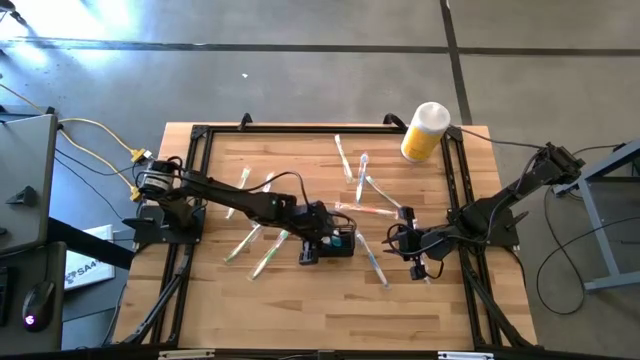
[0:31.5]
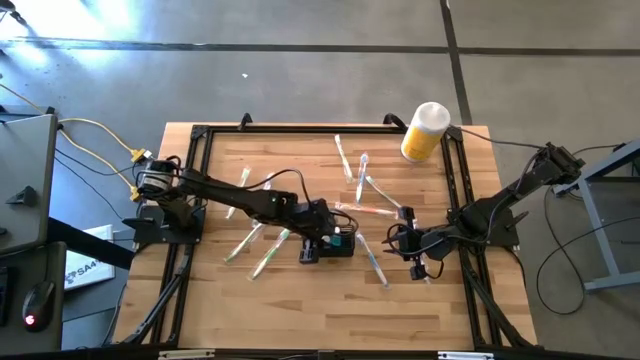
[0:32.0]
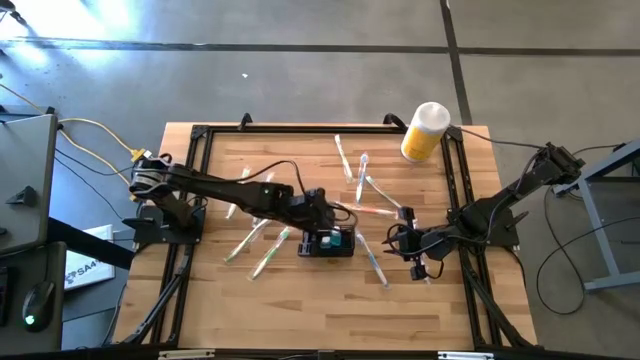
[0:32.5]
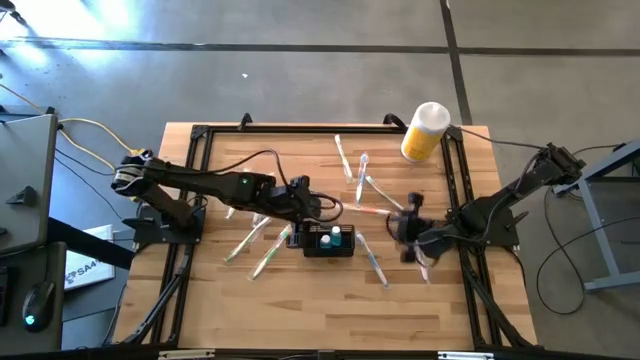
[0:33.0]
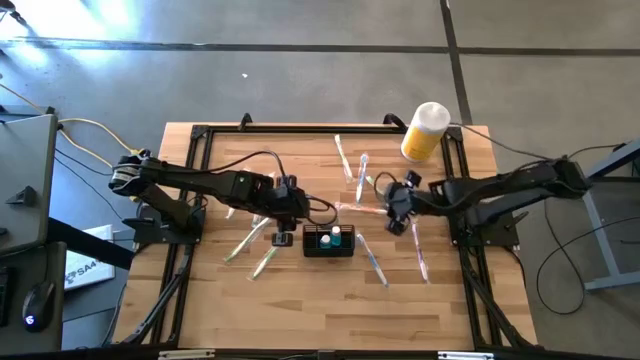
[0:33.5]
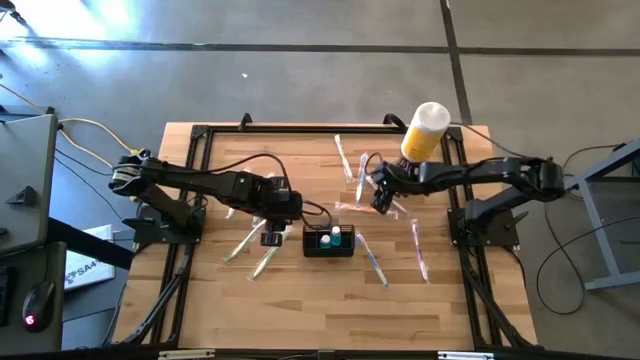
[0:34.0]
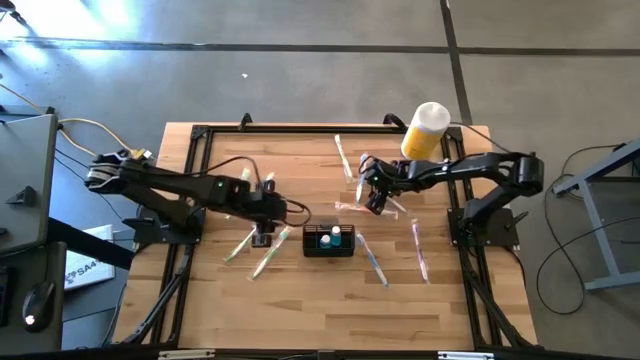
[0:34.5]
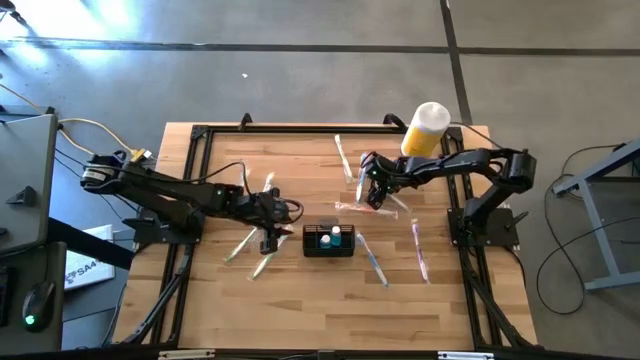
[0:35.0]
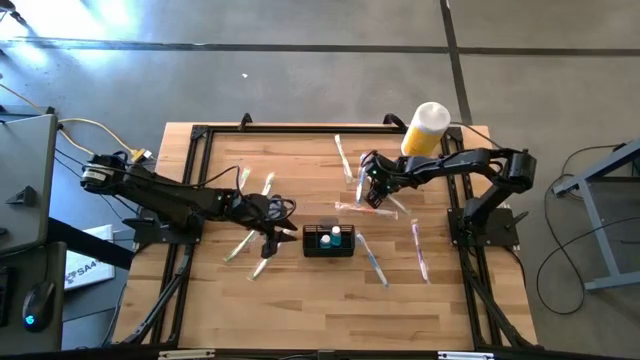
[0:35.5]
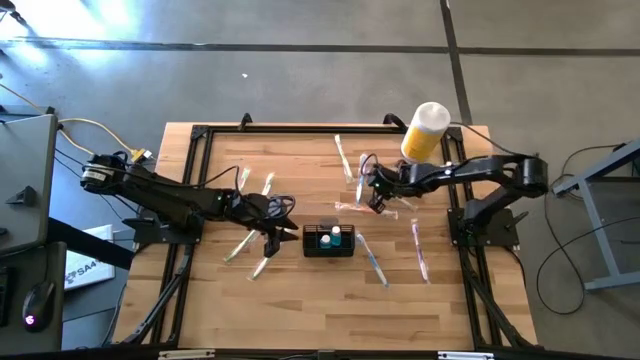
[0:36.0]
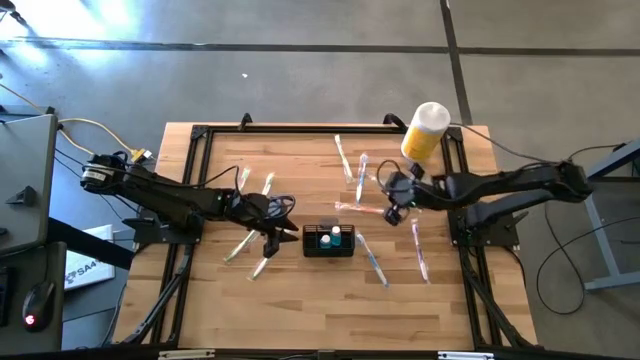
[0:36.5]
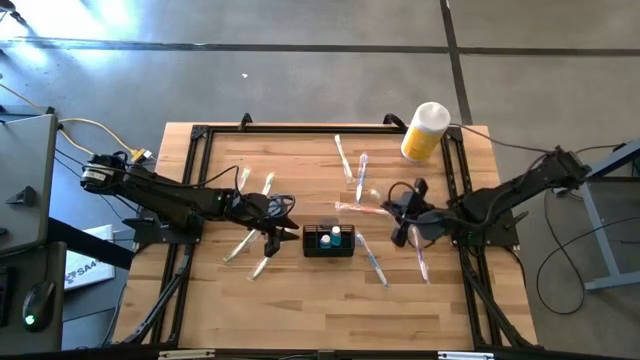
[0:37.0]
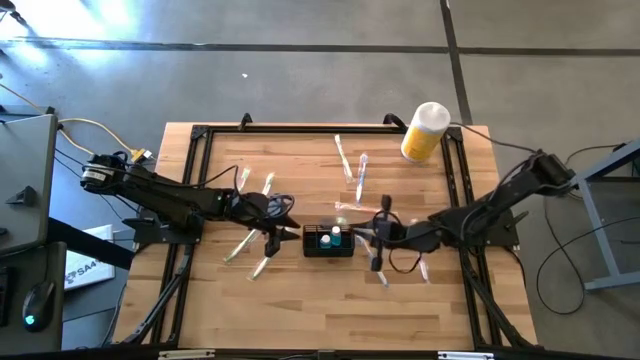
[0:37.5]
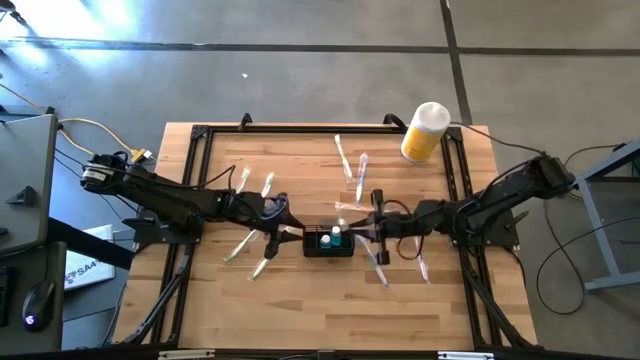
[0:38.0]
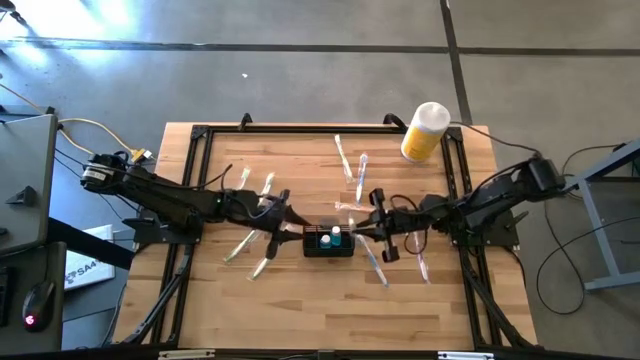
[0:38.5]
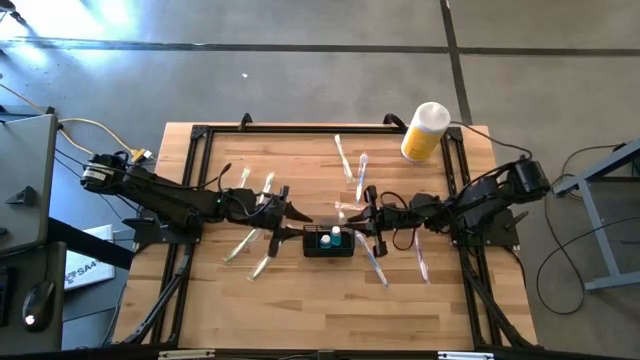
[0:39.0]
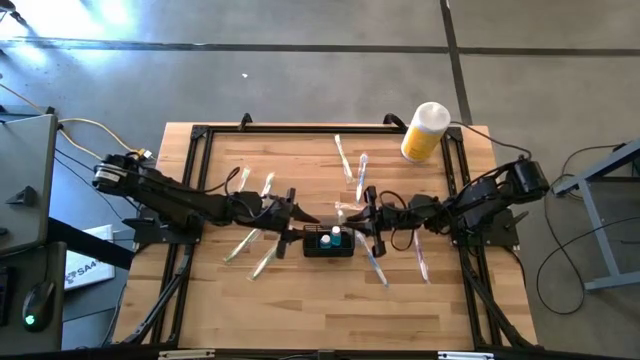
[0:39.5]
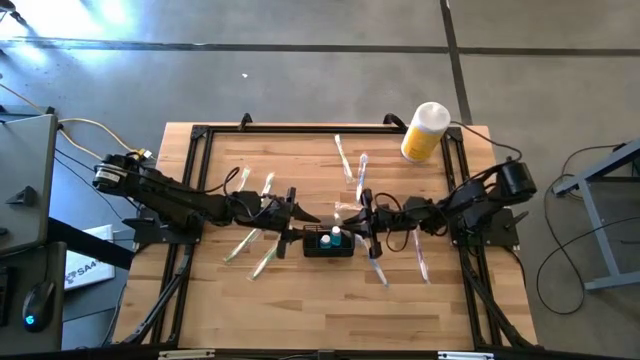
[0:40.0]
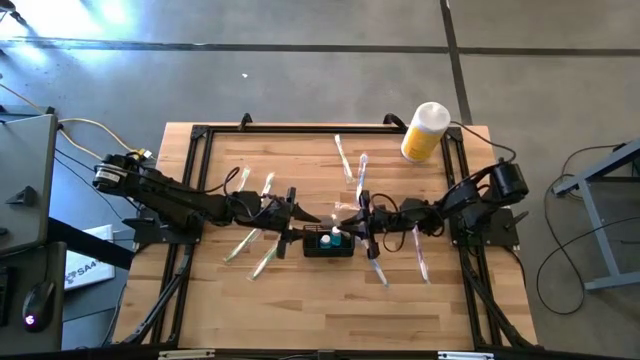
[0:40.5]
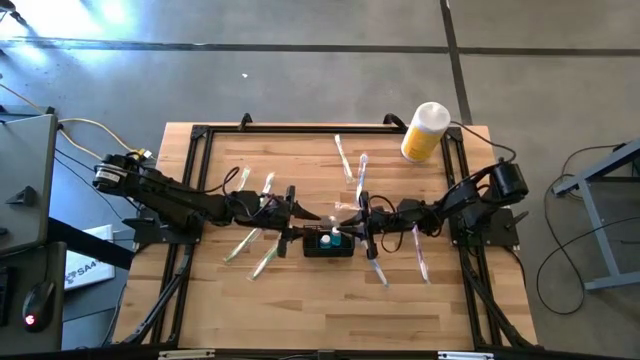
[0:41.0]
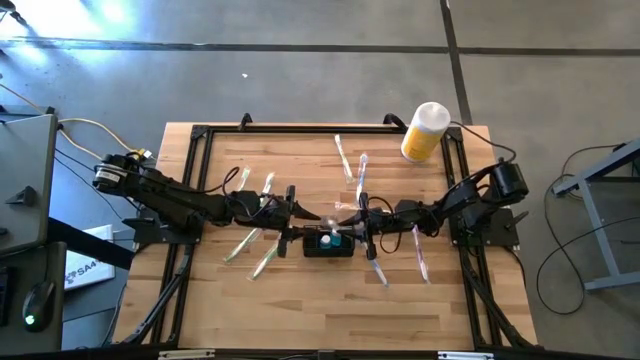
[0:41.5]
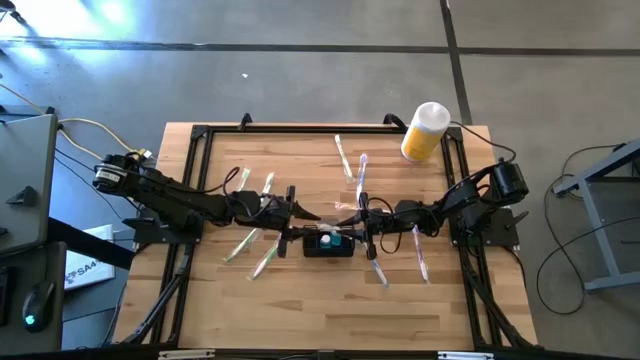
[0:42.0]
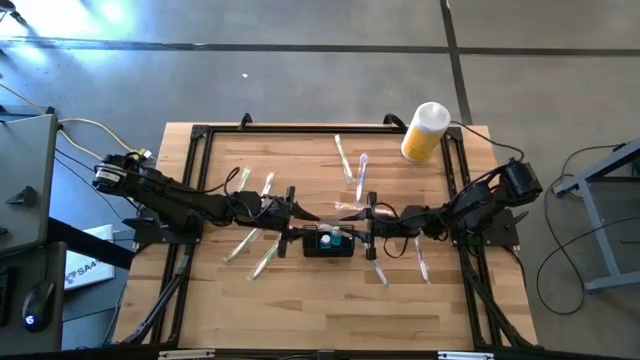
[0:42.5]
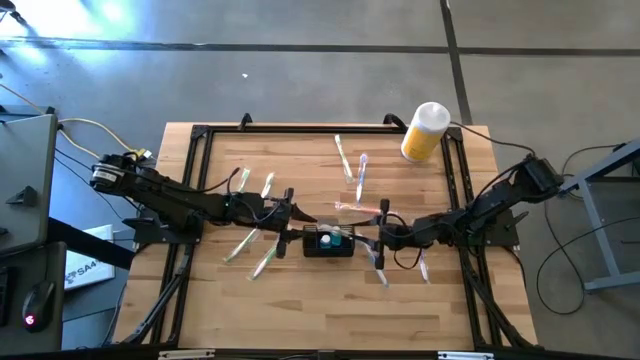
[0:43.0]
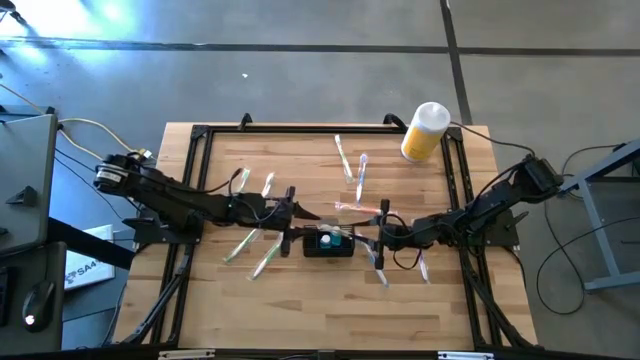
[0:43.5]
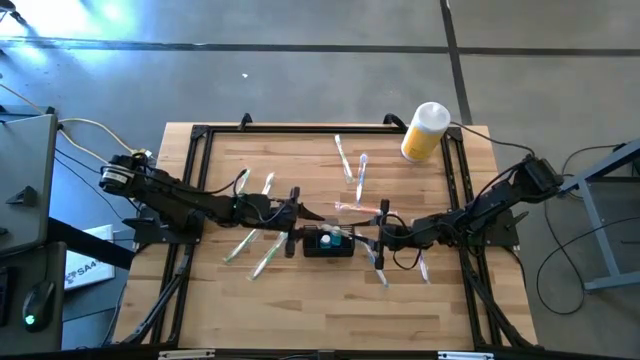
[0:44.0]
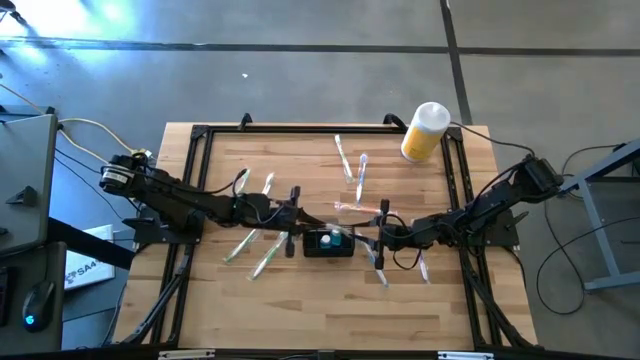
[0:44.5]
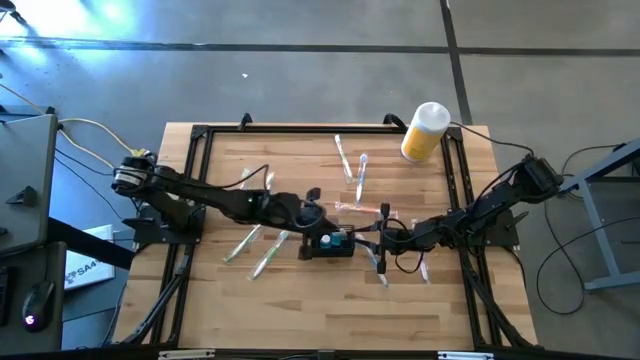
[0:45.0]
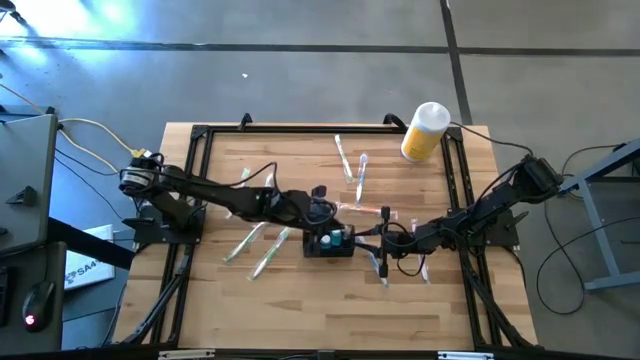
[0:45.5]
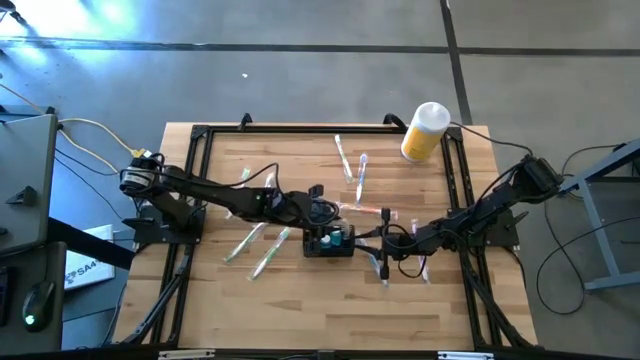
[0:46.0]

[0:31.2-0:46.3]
Task: Pick & Place toothbrushing station
Put the green toothbrush into the wire organizer

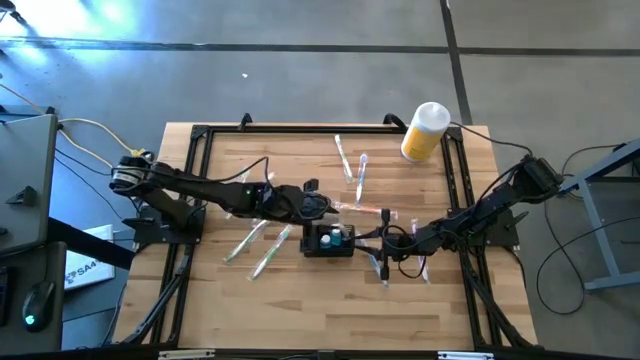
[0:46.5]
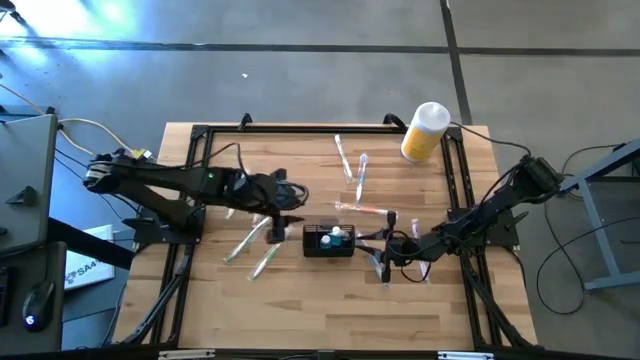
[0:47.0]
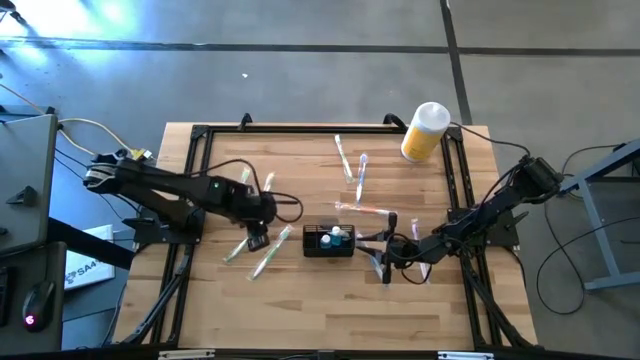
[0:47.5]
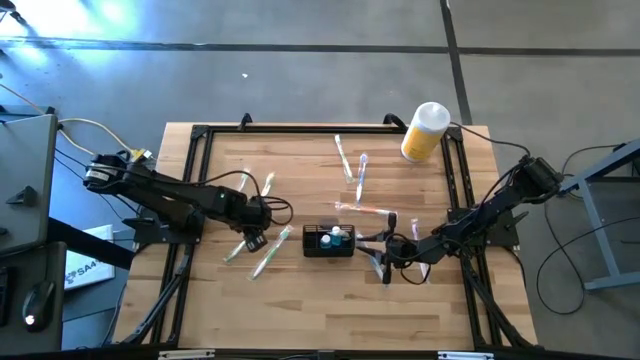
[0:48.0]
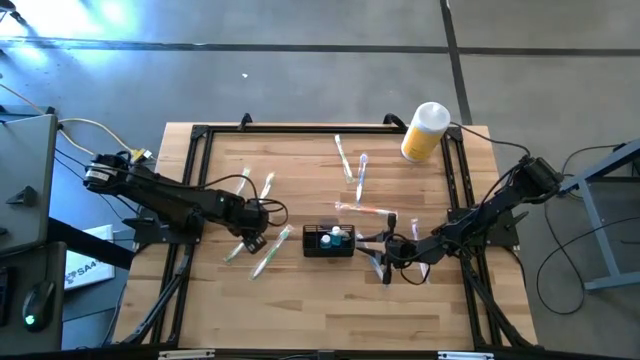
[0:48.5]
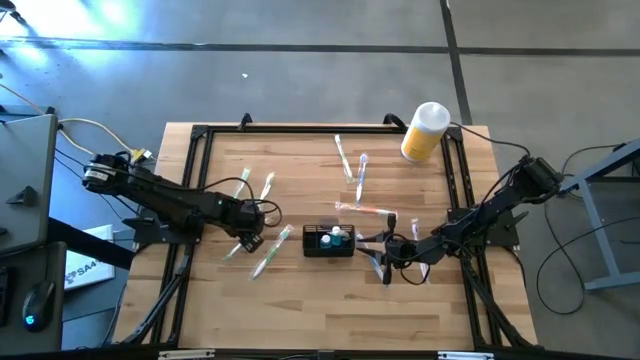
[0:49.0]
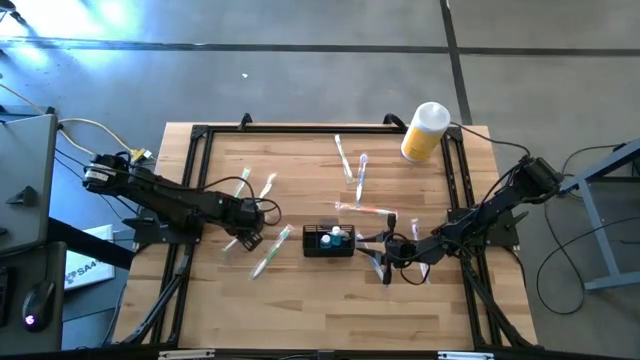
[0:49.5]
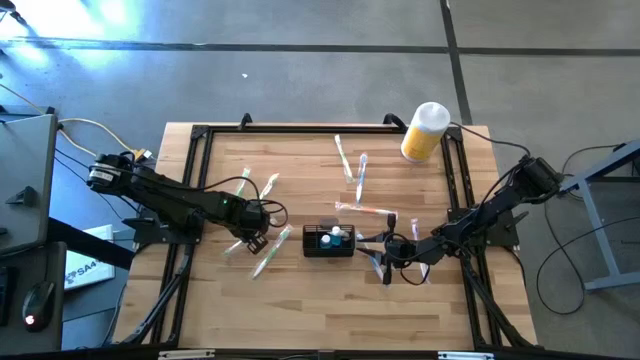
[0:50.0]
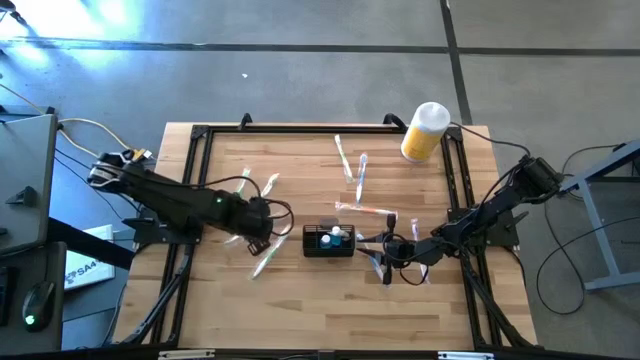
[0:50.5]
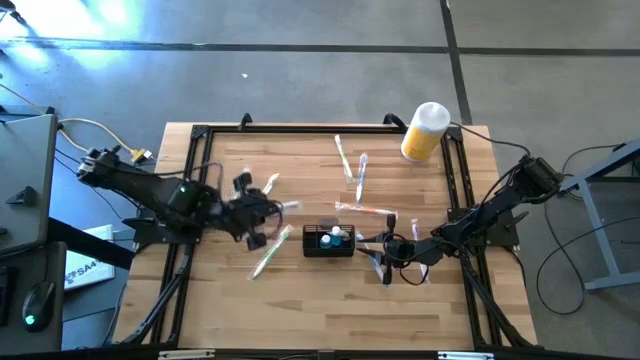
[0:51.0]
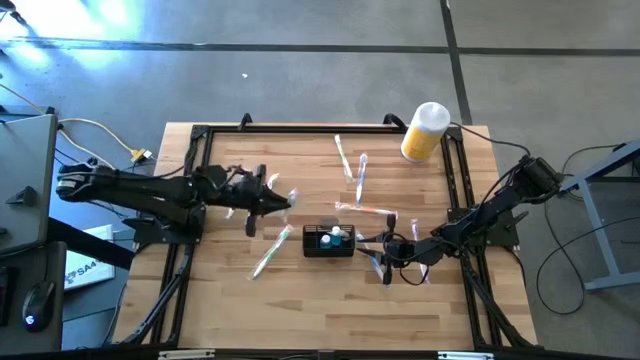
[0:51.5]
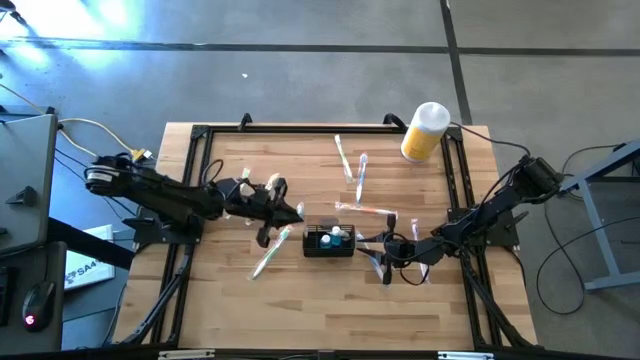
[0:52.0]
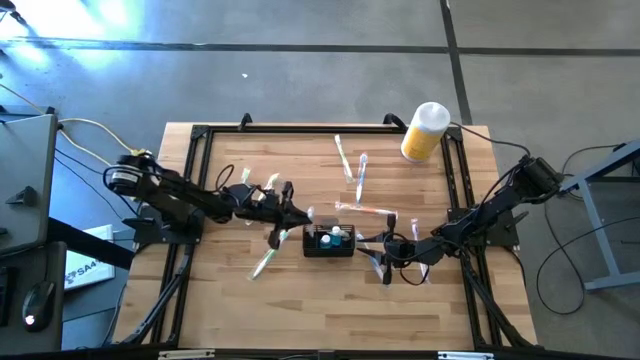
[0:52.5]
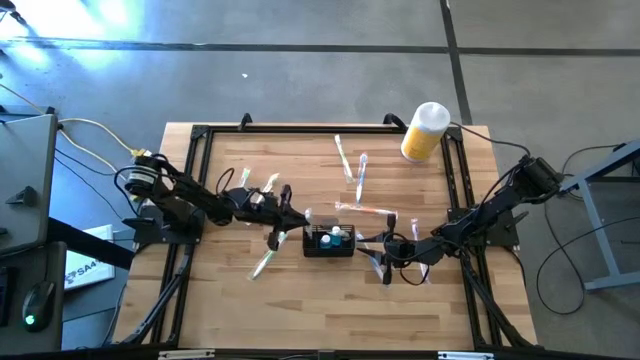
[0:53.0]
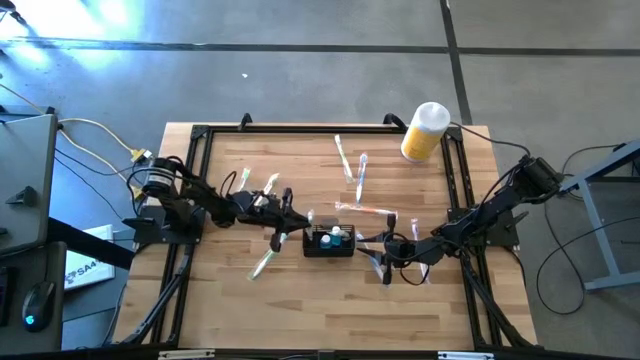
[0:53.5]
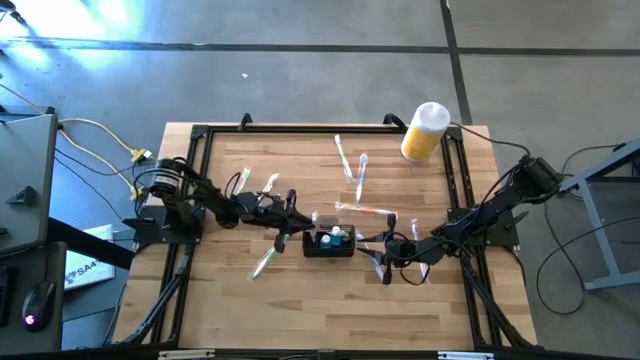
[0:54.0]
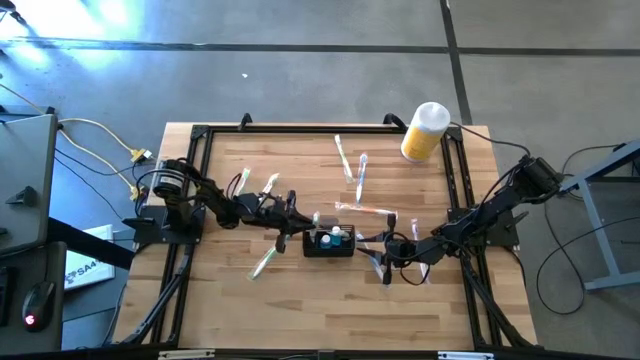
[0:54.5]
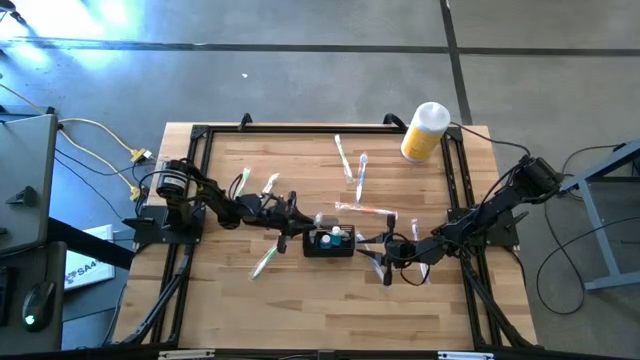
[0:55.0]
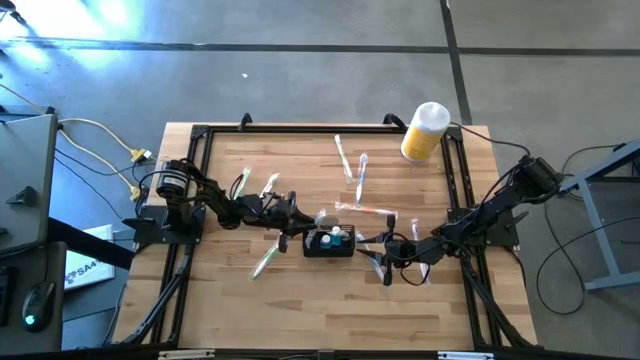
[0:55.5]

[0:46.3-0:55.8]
Put the green toothbrush into the wire organizer
